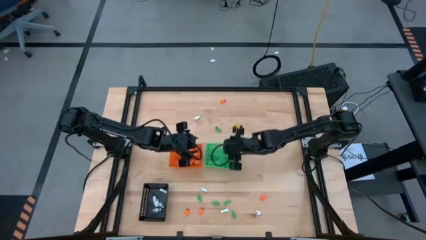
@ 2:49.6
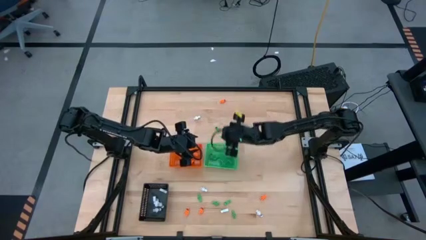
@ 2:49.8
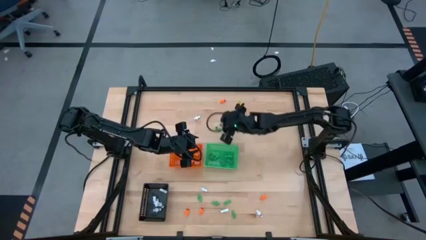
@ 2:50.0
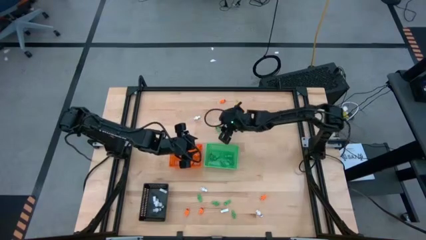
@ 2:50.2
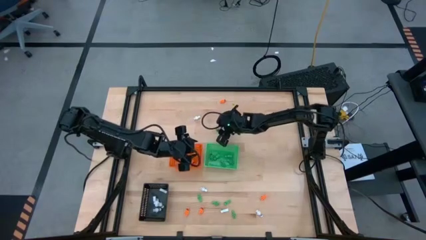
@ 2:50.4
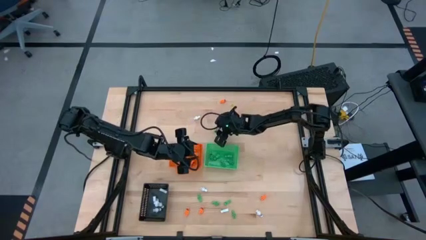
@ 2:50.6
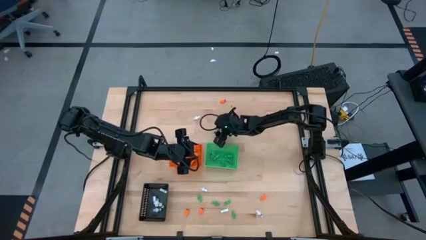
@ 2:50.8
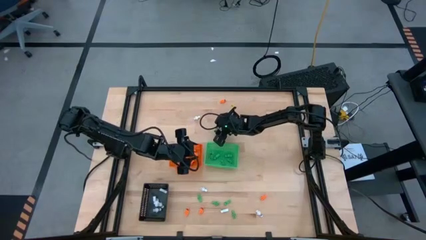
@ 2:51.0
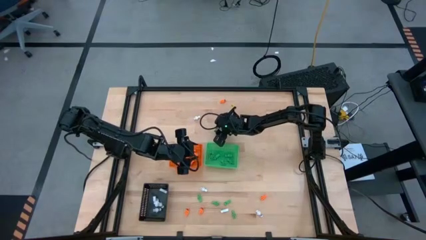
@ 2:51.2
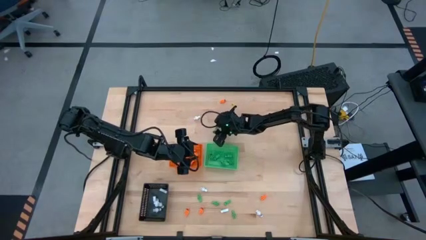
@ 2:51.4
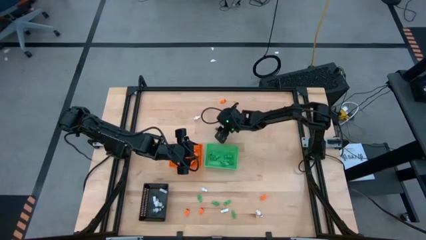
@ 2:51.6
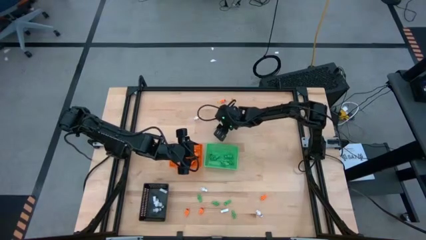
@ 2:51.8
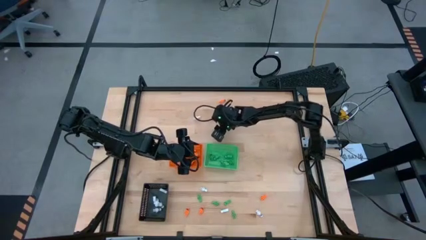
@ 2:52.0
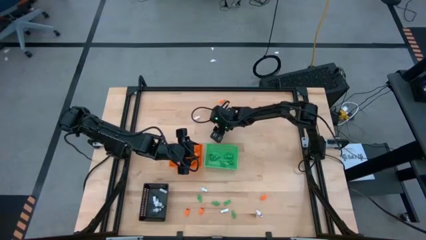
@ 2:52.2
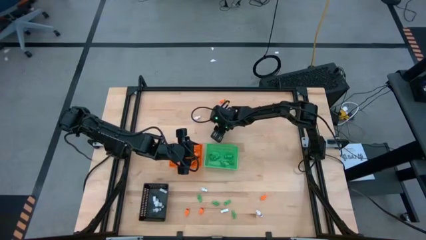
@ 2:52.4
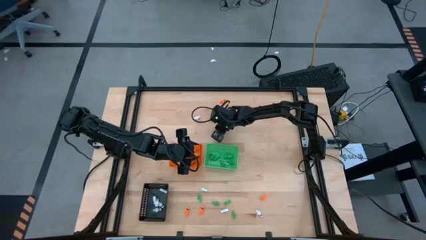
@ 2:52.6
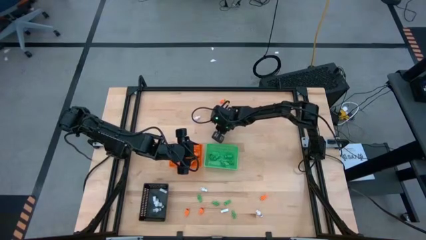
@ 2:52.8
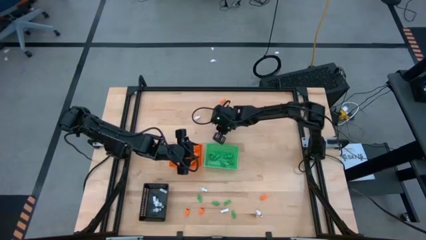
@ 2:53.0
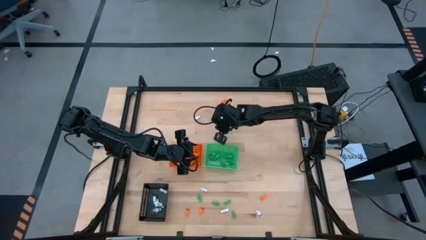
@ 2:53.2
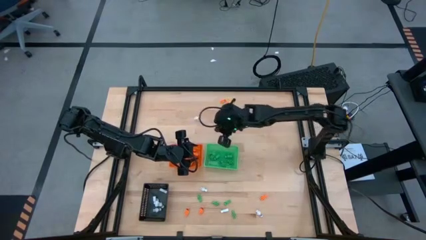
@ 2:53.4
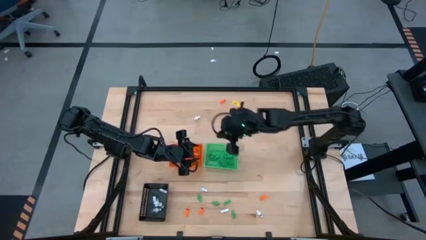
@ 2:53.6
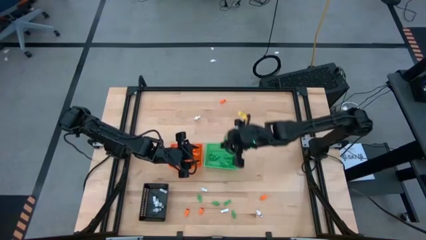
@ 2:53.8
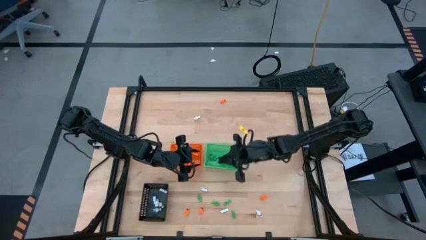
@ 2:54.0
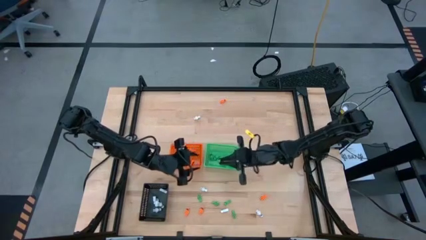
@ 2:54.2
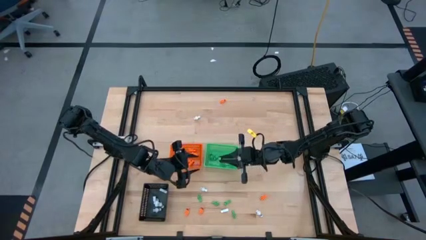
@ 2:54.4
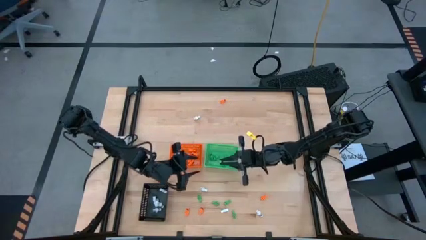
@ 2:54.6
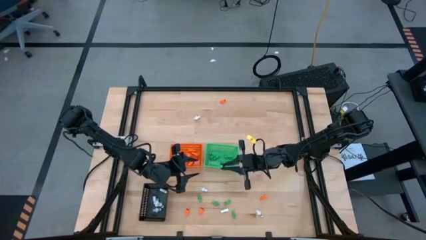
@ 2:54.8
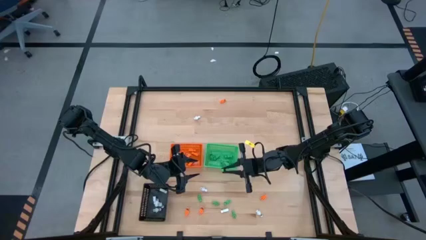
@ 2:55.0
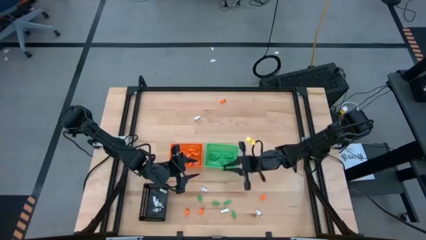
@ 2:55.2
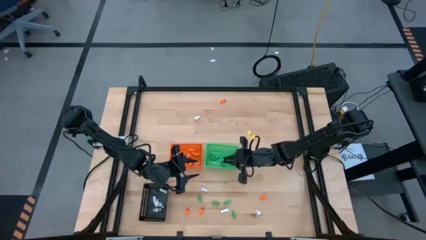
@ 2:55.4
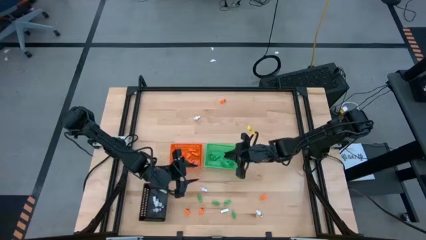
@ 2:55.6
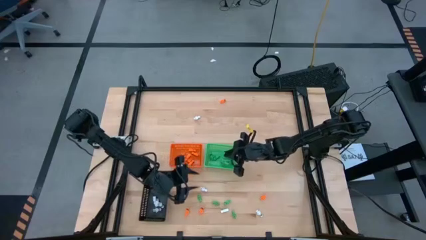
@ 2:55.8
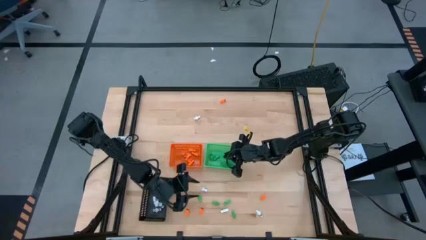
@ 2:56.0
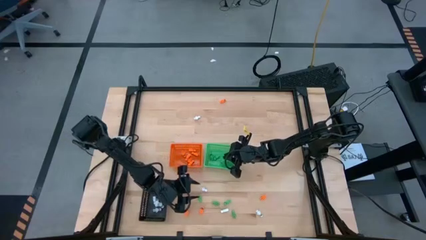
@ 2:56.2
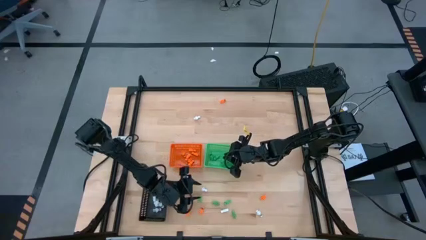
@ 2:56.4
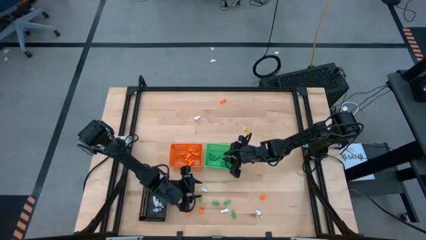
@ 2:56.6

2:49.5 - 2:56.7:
Task: Sort Halloween decoration
Put the green skeleton toy into the green bin

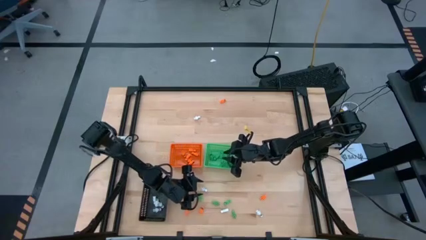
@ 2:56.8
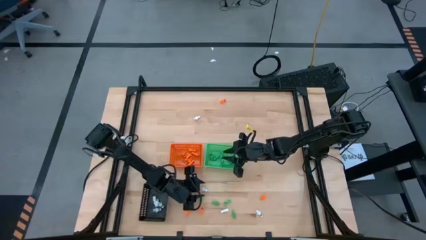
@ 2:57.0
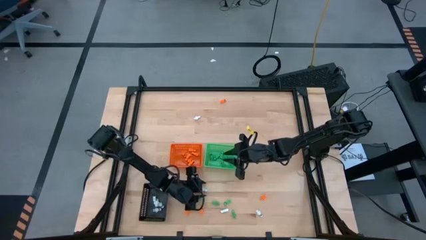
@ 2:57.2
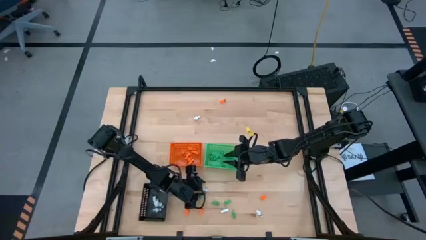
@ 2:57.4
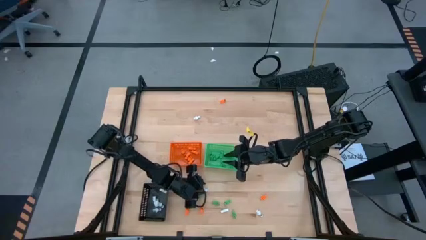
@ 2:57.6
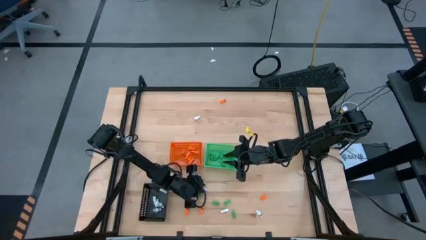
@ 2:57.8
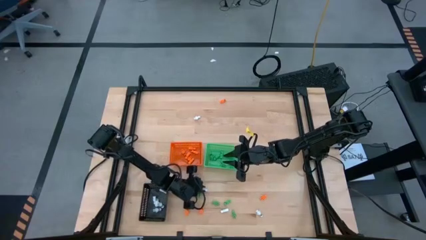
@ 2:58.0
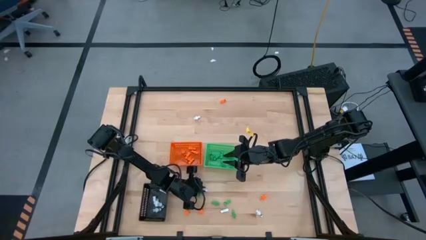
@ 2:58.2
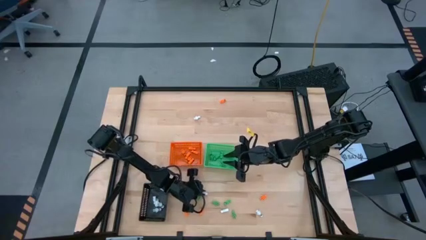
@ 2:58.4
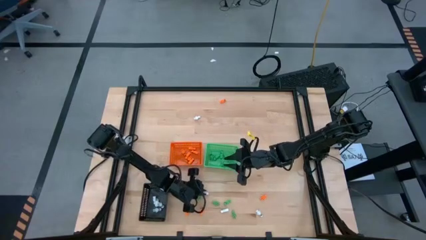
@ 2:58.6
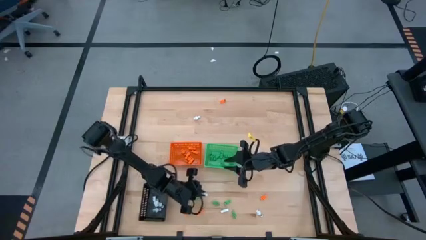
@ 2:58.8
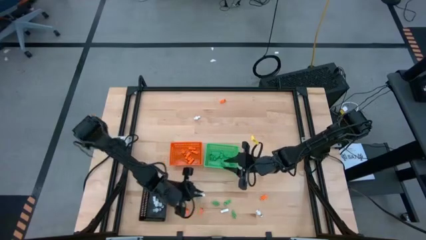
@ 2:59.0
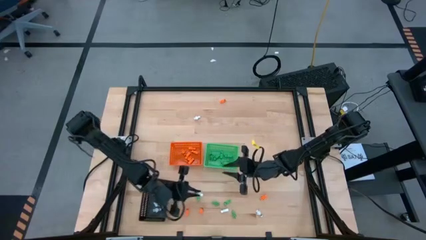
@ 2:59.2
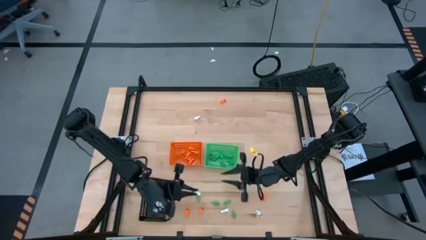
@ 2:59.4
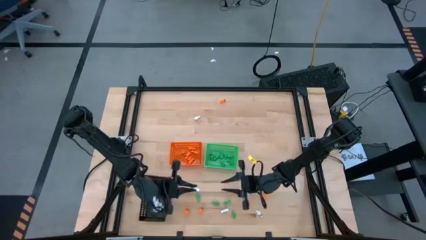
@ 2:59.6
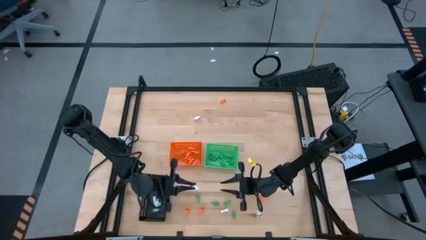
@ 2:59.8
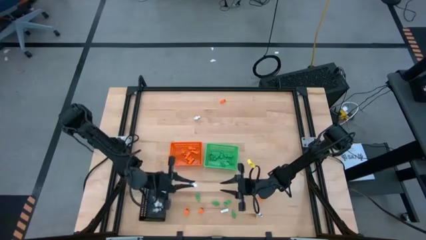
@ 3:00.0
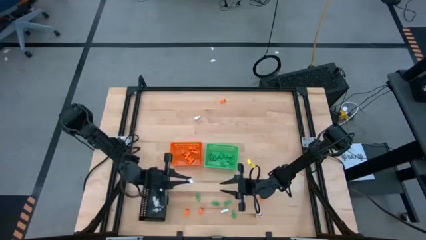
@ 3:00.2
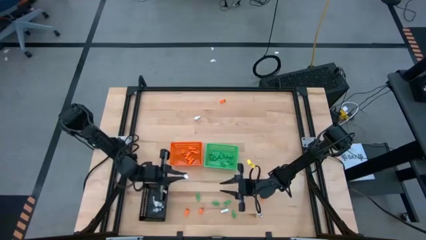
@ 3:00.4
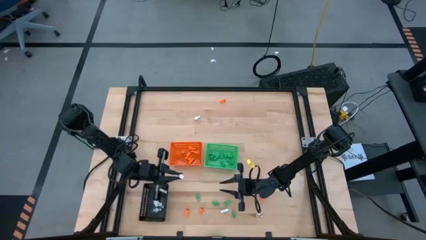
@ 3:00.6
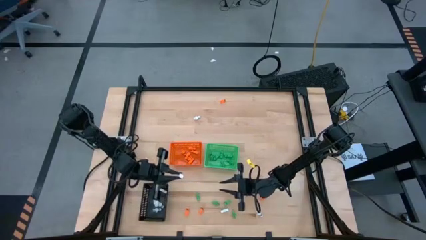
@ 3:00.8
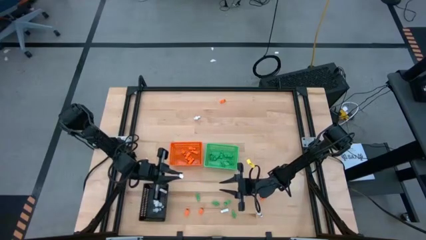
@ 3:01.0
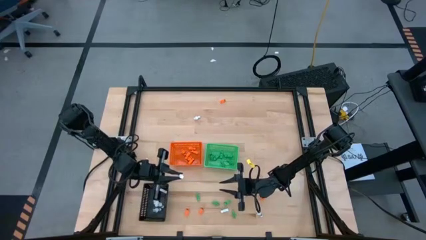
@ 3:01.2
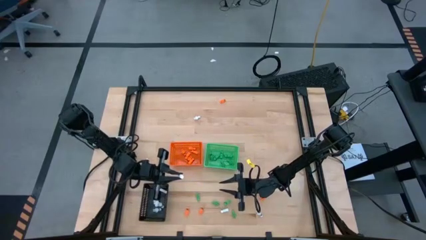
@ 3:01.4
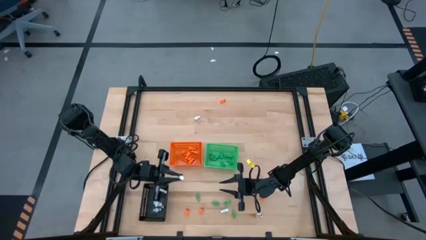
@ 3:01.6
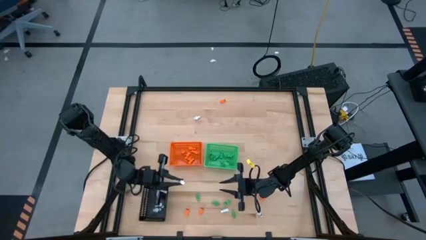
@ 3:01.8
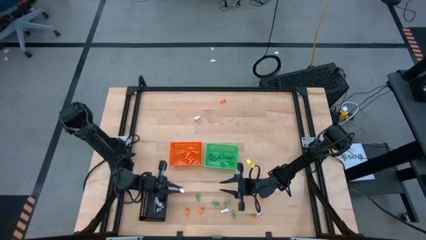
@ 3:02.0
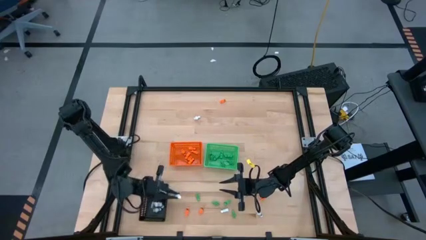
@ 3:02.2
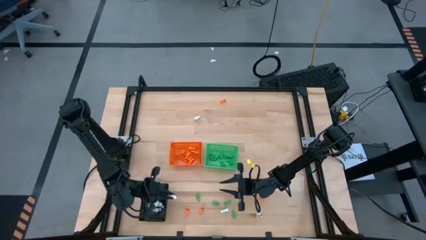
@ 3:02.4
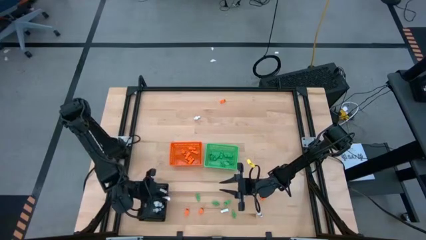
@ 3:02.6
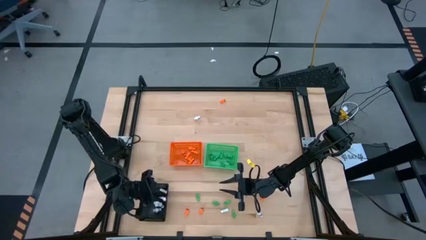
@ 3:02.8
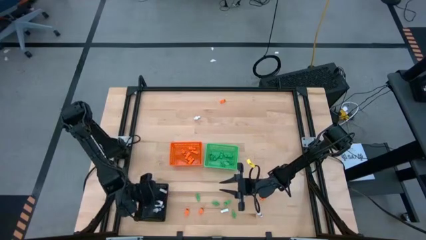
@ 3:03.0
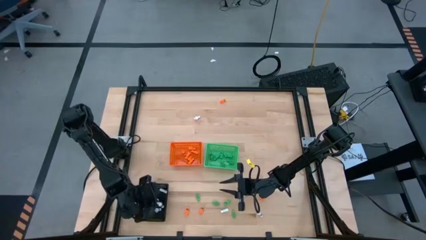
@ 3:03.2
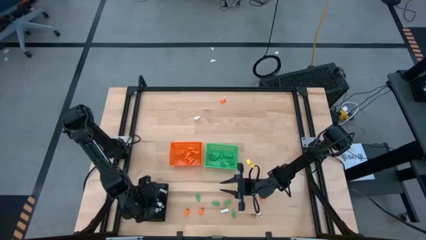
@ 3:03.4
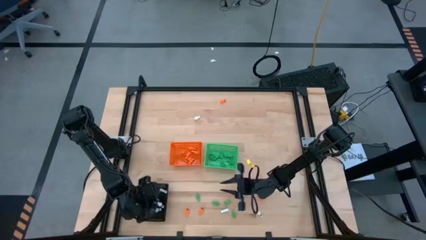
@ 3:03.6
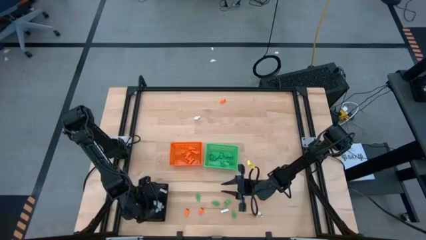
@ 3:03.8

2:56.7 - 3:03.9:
Put the white skeleton toy into the black bin
